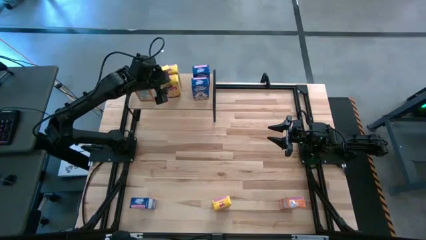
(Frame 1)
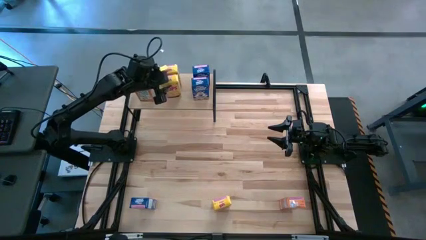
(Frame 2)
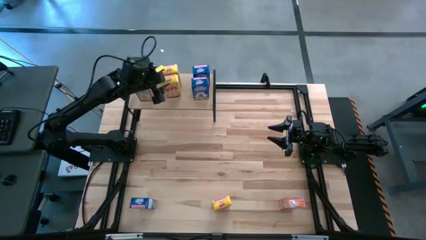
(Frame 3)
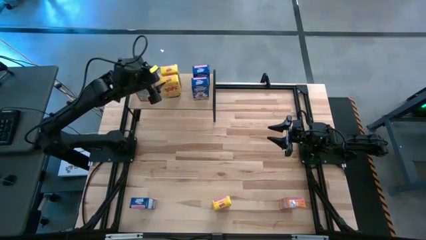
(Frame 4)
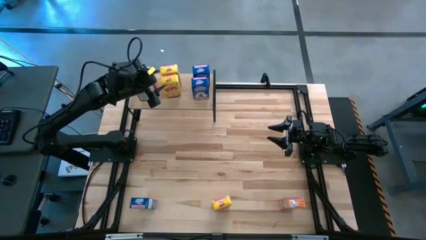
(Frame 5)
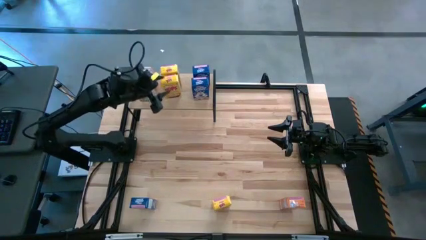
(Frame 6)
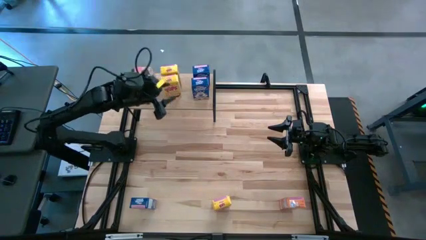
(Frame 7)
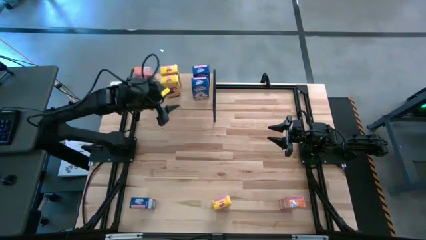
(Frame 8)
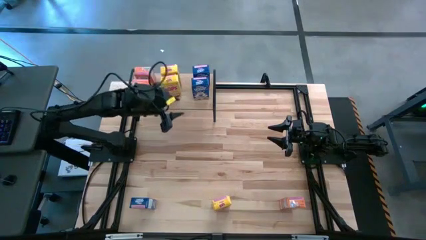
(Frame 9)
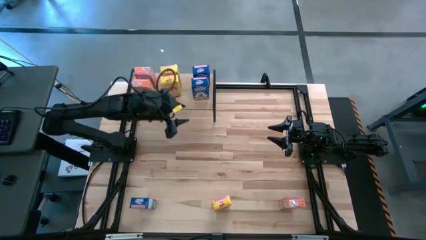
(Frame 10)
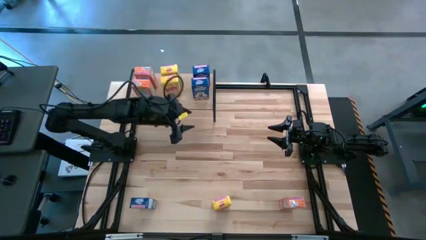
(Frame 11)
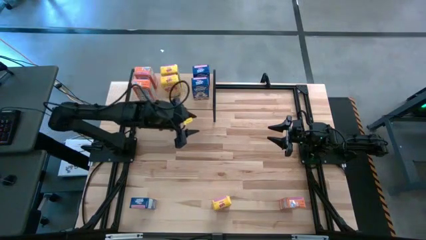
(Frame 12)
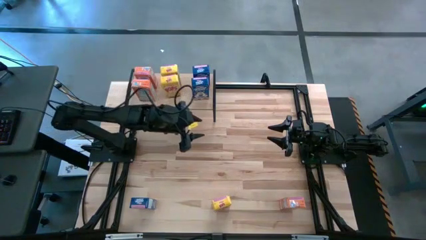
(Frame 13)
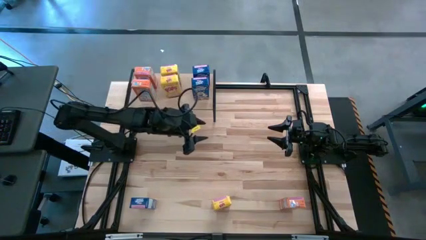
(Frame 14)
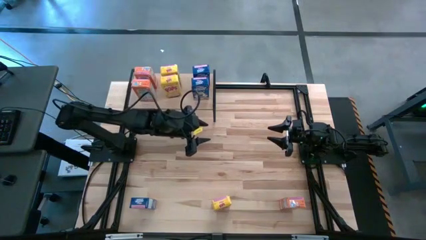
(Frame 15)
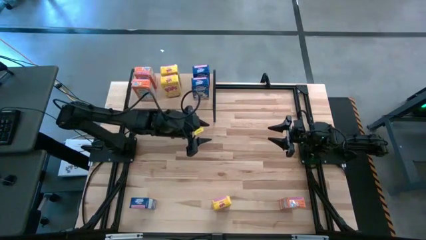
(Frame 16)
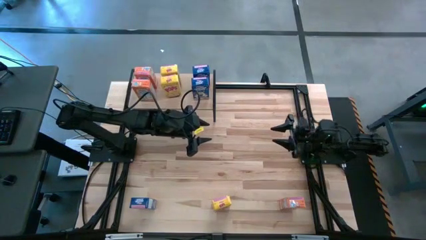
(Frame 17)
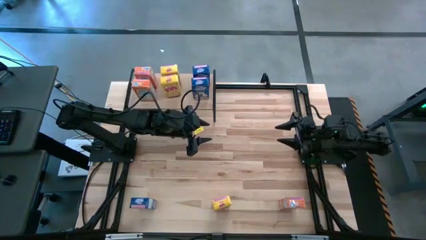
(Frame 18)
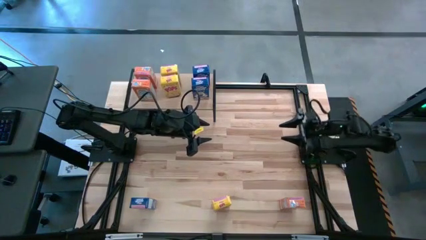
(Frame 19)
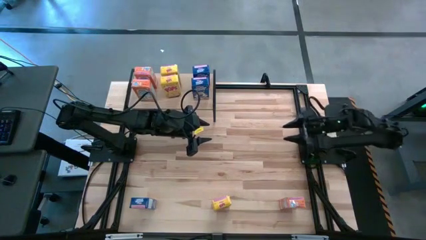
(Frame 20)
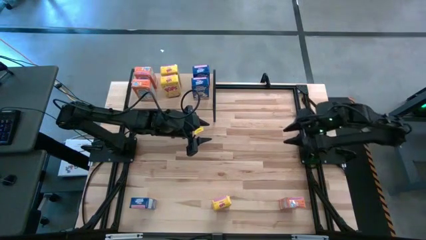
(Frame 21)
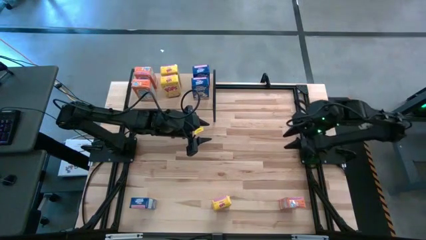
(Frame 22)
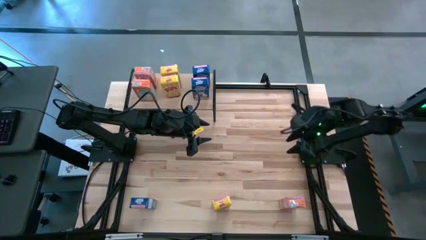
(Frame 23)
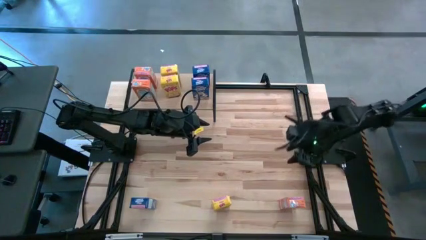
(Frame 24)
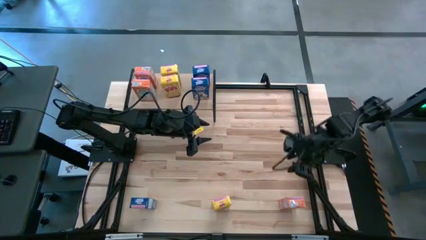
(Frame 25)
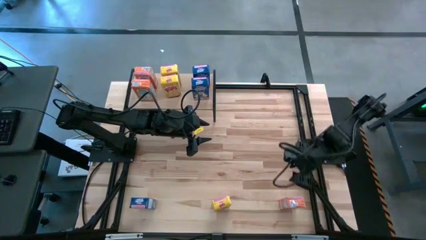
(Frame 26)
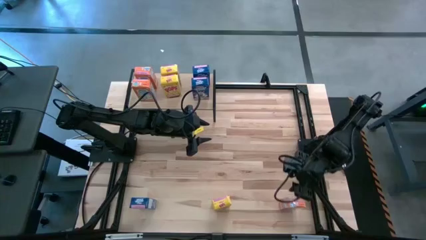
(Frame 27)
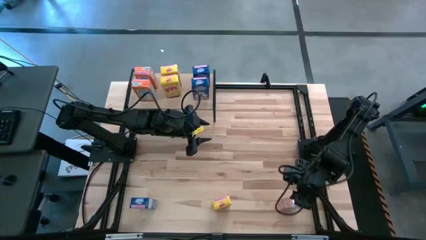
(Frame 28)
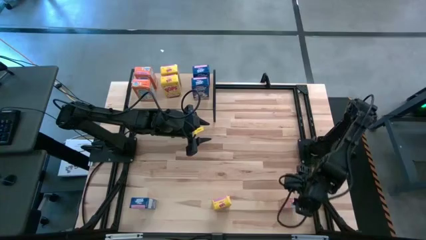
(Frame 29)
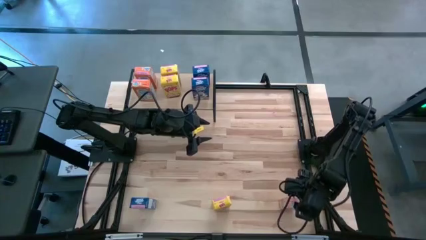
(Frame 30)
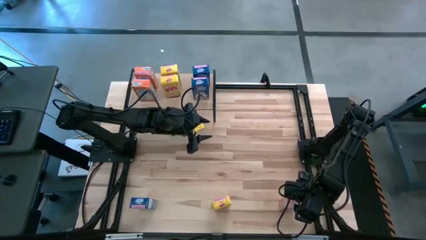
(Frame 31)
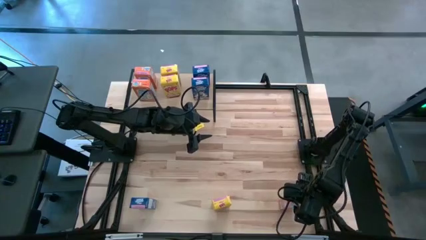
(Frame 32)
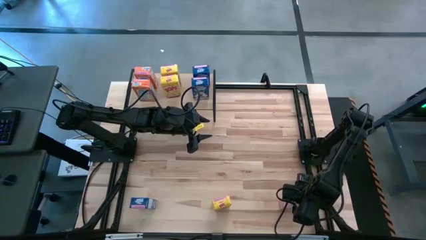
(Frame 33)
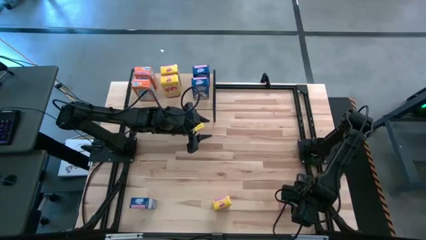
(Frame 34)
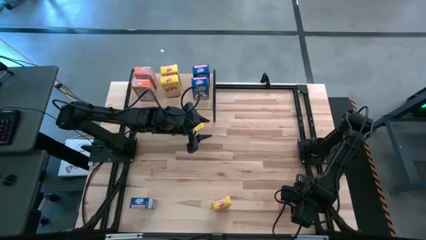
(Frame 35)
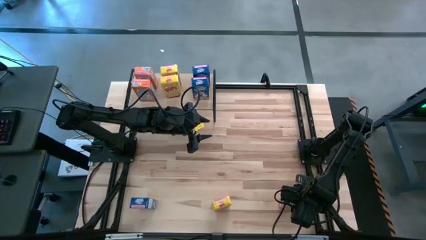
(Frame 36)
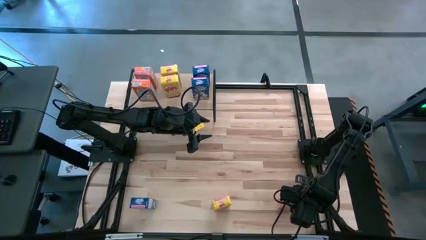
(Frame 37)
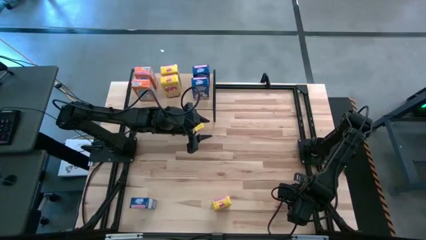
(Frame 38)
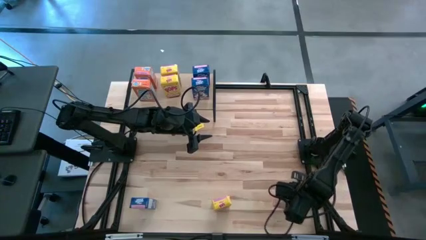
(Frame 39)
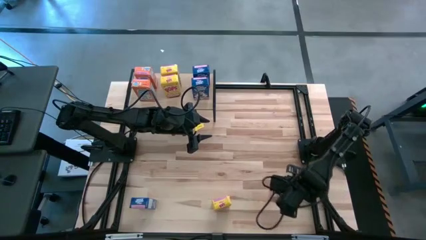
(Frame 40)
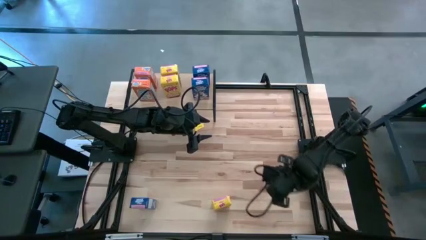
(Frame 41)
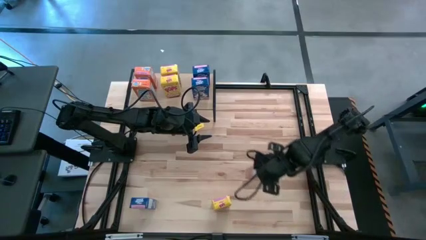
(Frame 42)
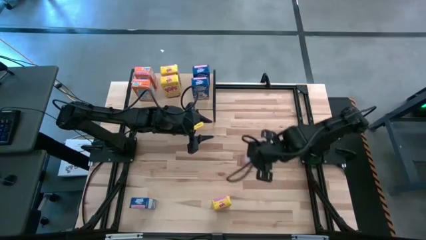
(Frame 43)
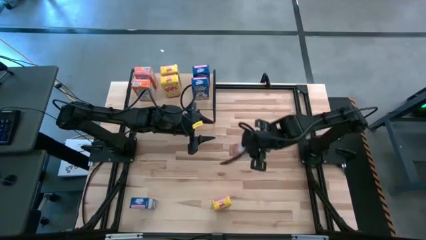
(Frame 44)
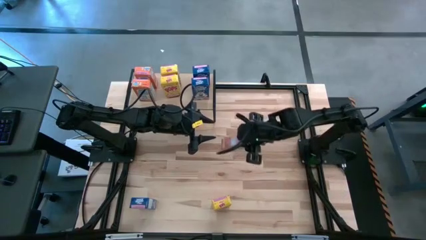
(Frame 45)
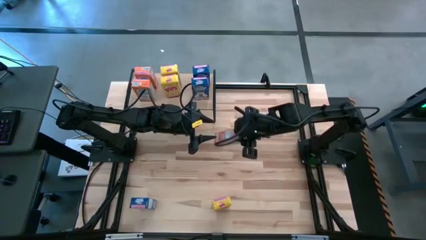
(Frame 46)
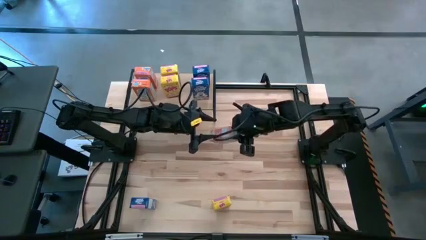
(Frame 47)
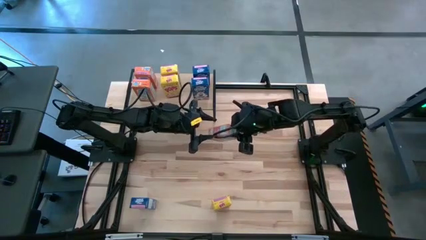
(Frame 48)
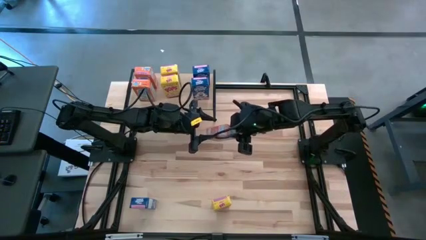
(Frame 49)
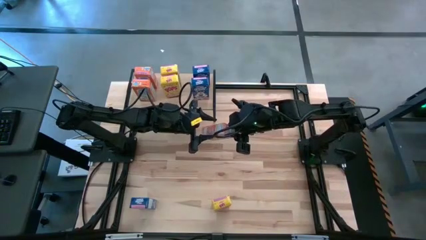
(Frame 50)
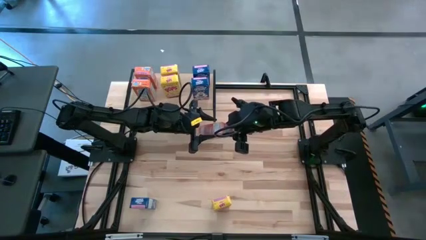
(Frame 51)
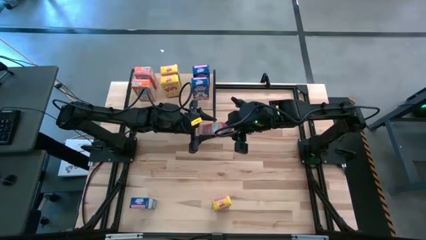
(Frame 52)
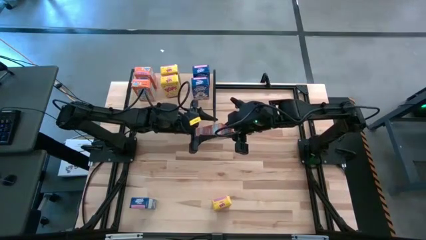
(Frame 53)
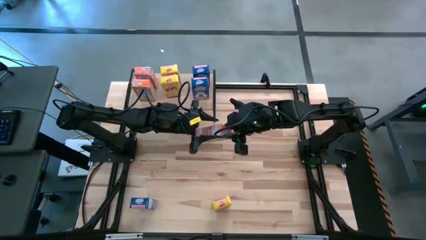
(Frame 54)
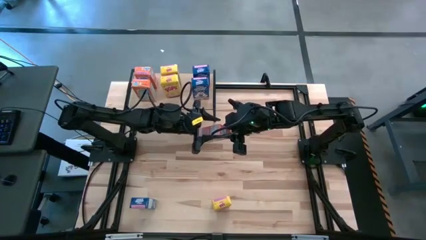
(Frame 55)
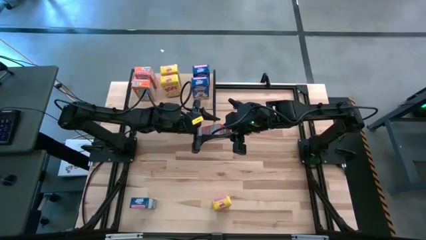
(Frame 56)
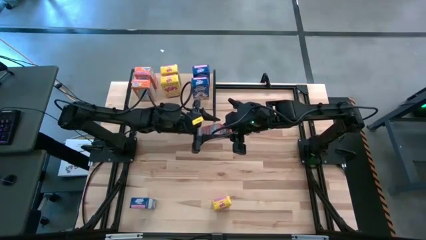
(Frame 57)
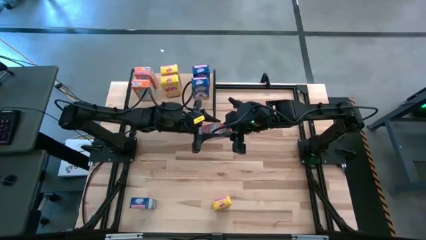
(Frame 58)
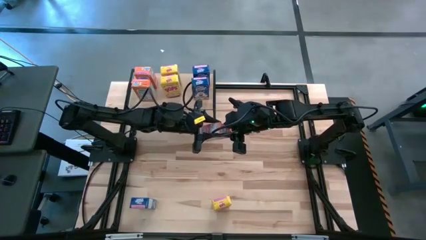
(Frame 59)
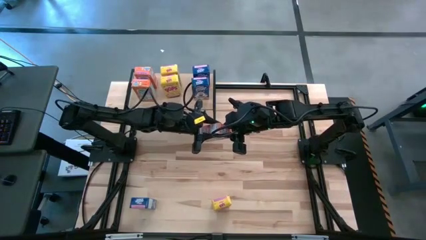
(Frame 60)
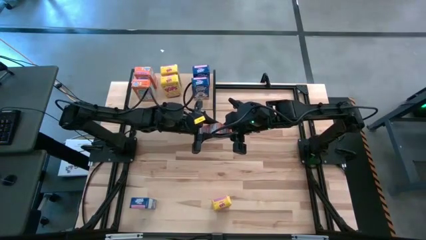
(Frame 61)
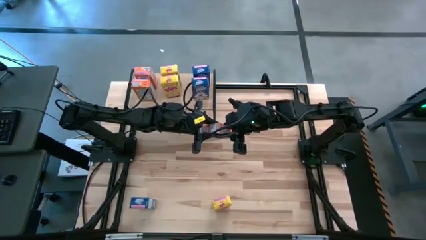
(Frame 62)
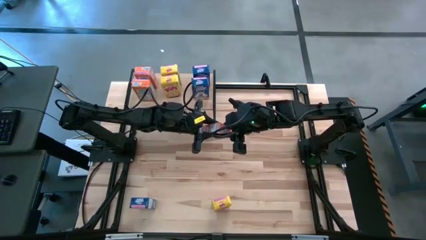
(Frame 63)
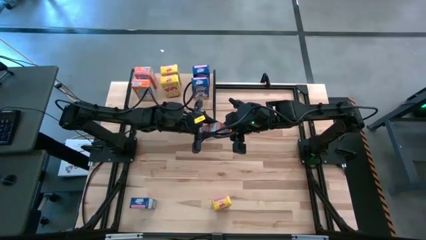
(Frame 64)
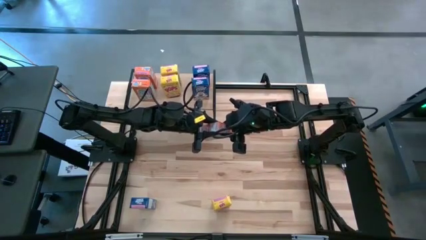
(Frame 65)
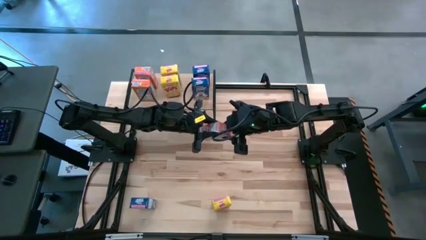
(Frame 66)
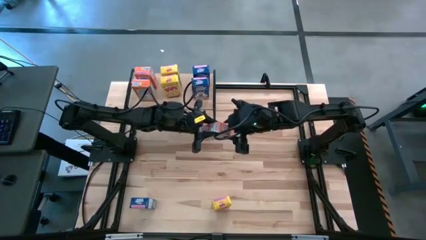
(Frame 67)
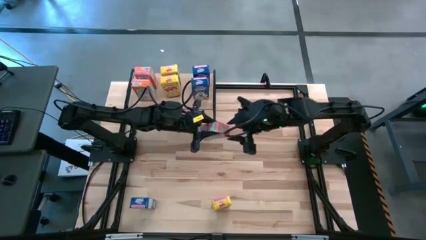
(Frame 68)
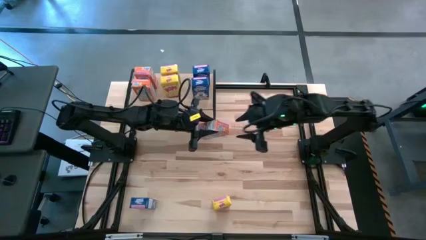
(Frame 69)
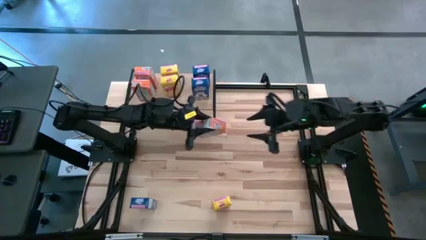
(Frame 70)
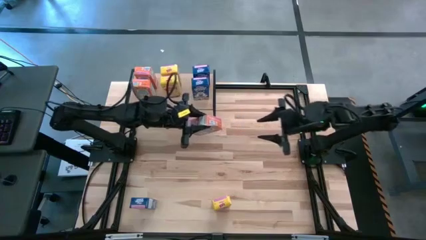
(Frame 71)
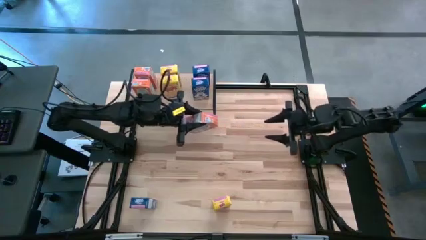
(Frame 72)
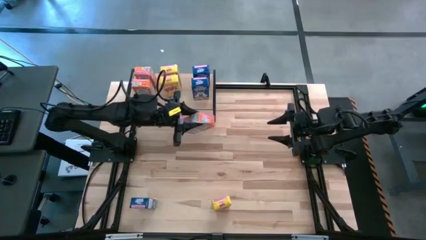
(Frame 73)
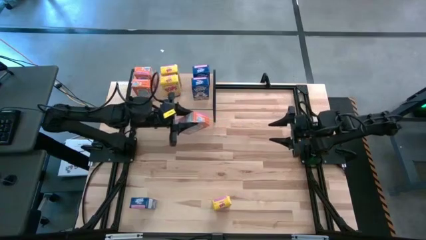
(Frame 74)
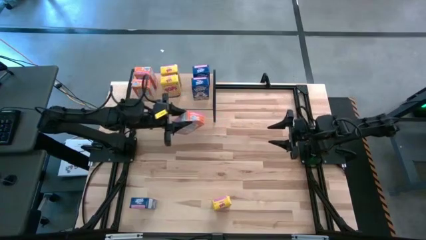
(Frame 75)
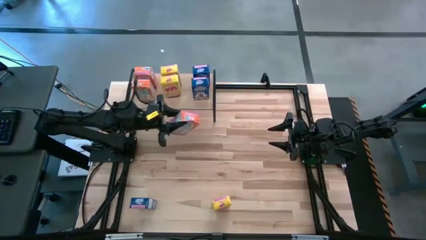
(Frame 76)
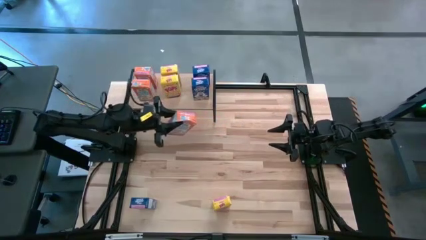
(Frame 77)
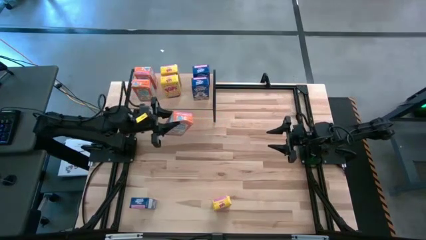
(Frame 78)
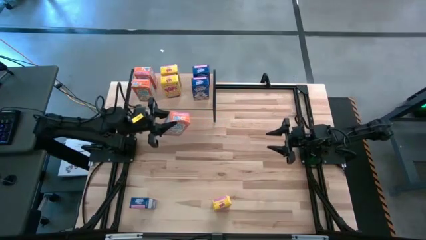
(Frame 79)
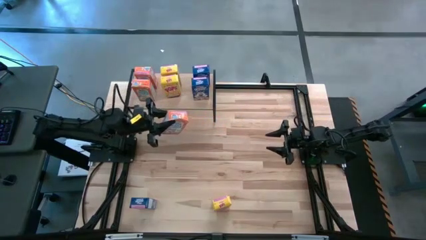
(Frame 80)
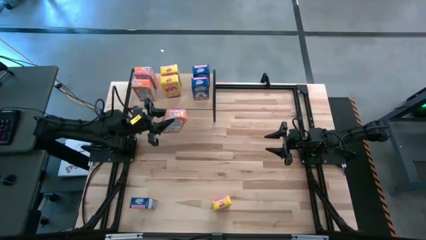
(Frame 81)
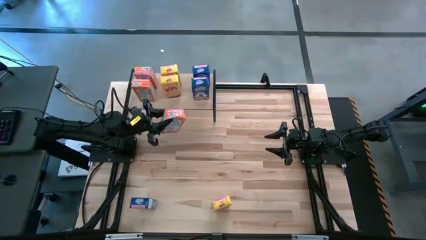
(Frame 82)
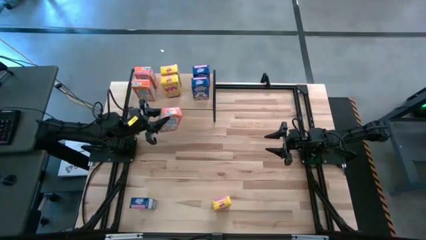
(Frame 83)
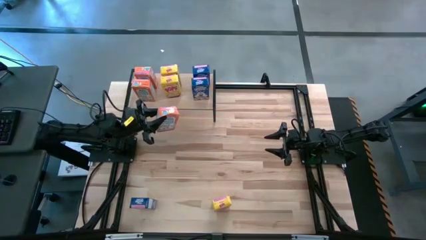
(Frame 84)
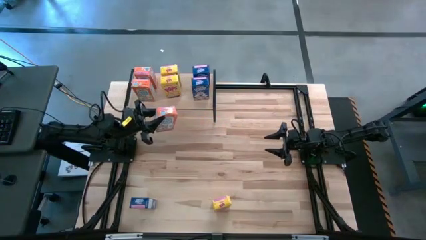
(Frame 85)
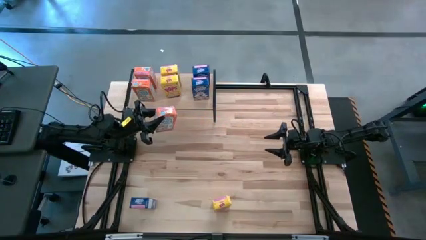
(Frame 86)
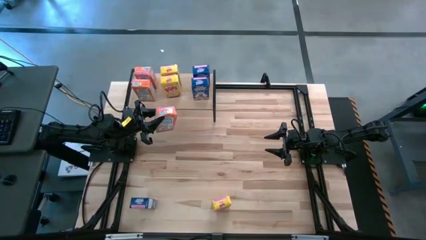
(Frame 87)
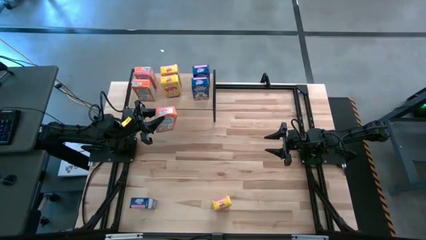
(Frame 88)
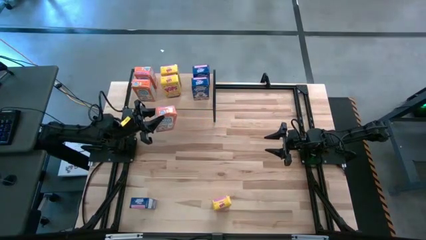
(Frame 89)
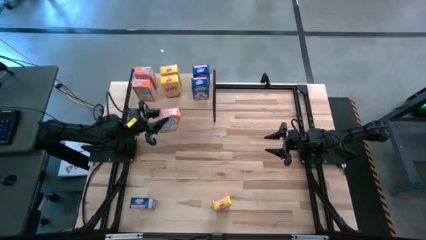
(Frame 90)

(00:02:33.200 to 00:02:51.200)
Task: Stack cereal on shelf
Put the orange cereal box on the shelf aligned with the other orange cereal boxes
